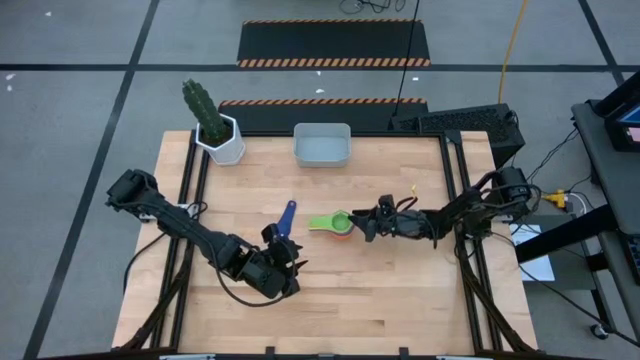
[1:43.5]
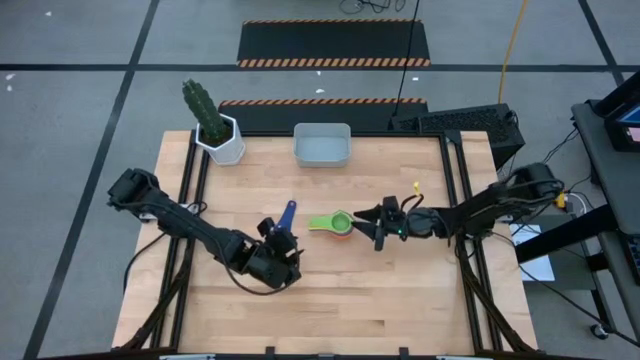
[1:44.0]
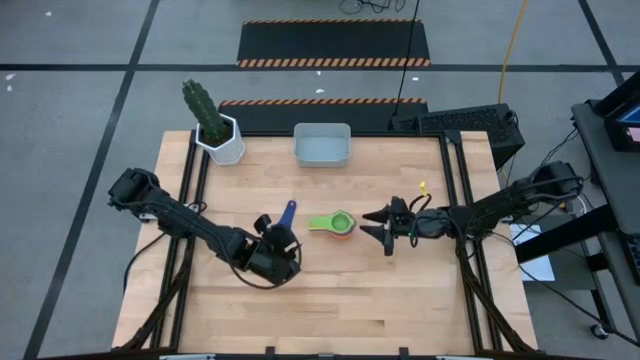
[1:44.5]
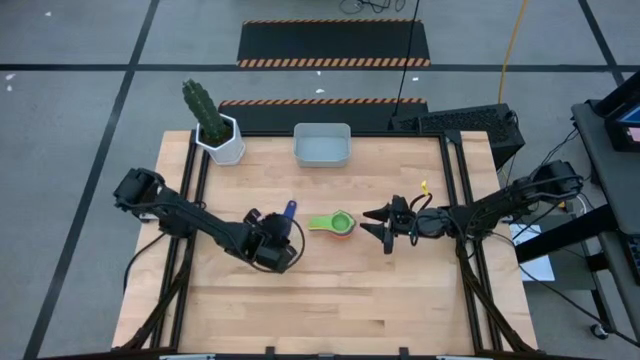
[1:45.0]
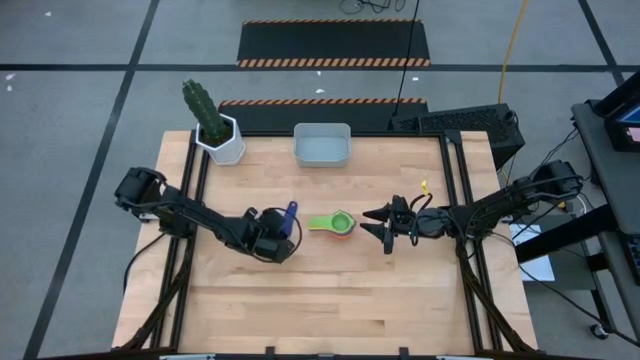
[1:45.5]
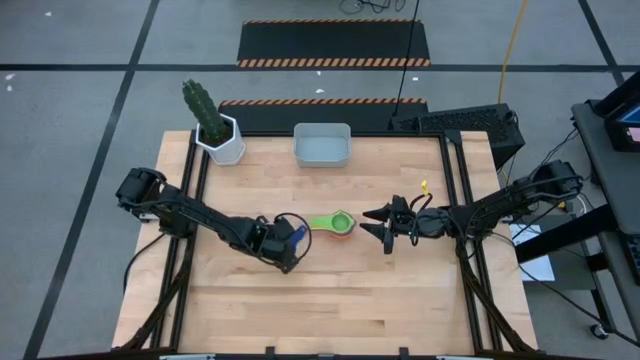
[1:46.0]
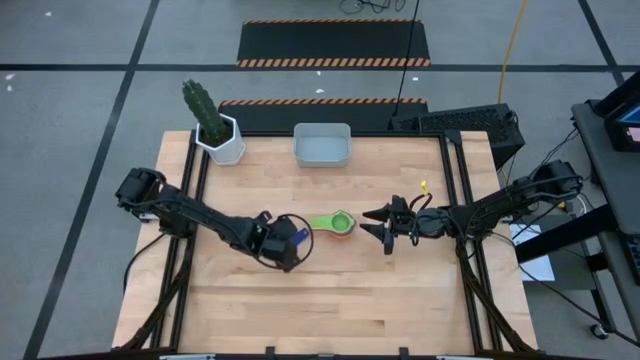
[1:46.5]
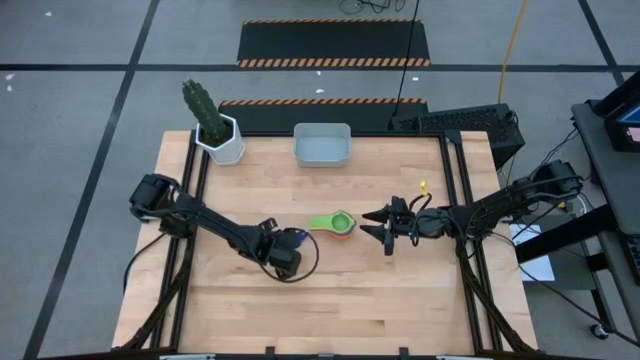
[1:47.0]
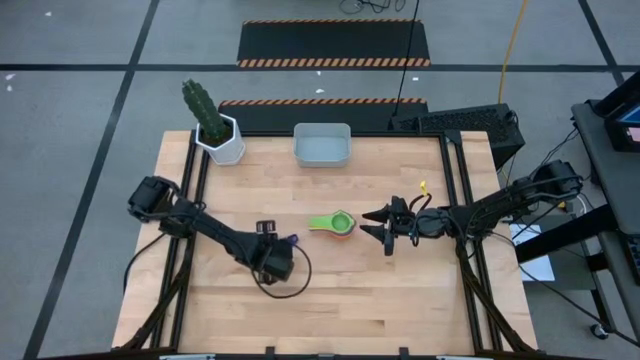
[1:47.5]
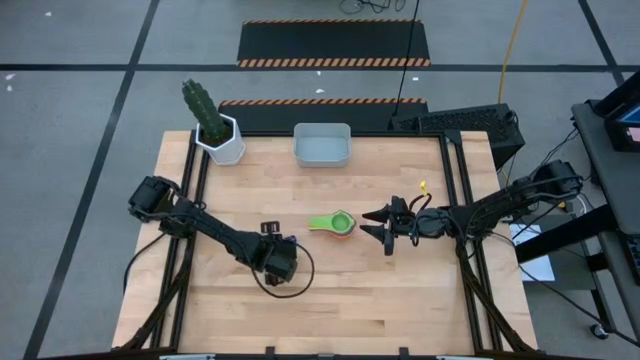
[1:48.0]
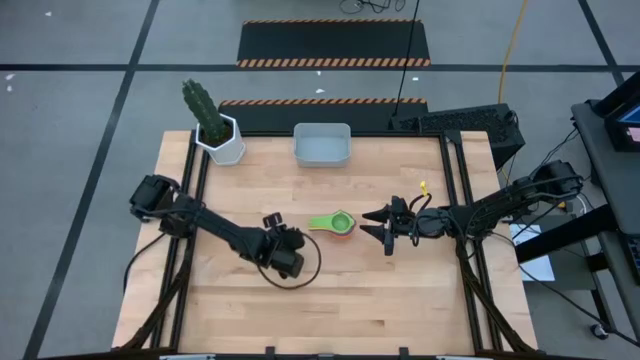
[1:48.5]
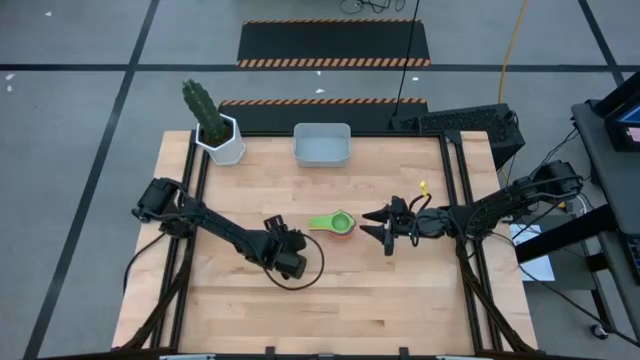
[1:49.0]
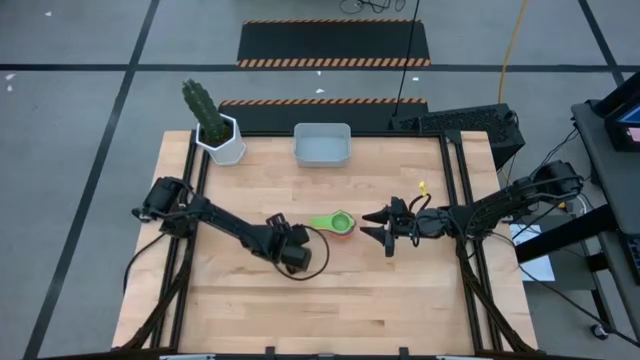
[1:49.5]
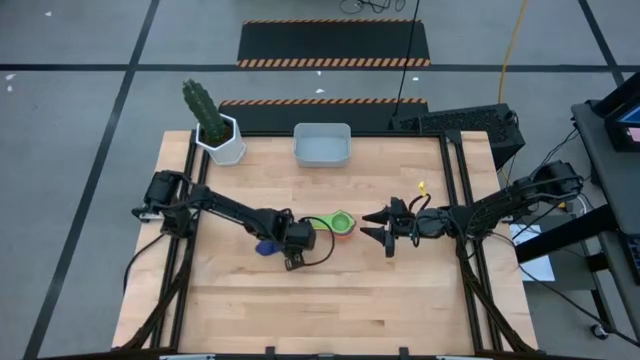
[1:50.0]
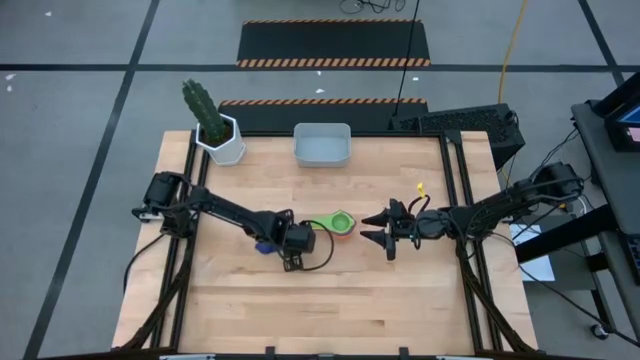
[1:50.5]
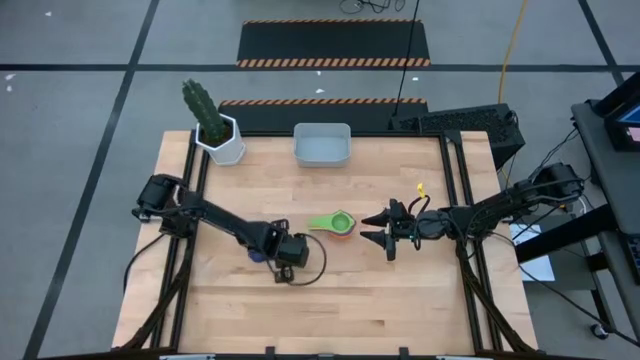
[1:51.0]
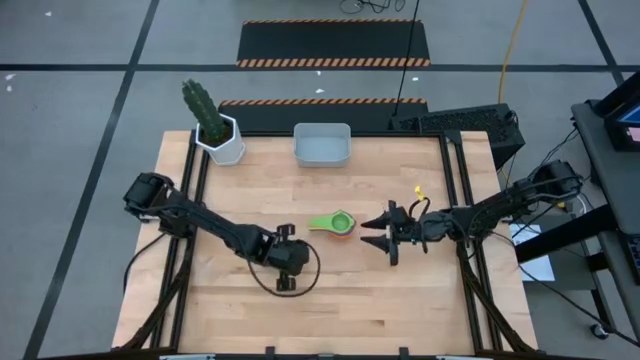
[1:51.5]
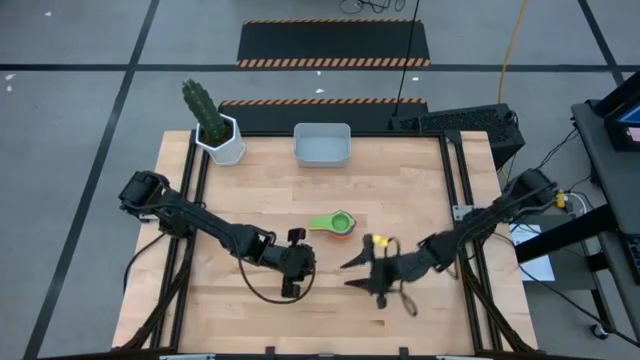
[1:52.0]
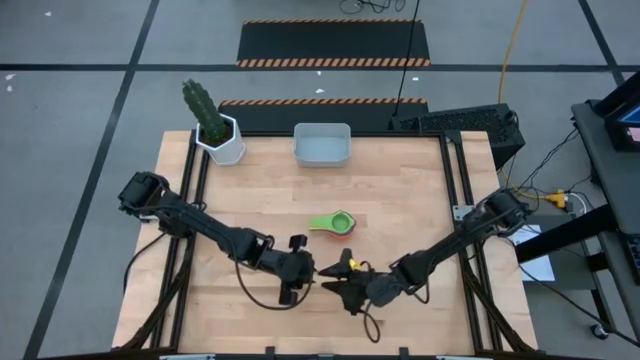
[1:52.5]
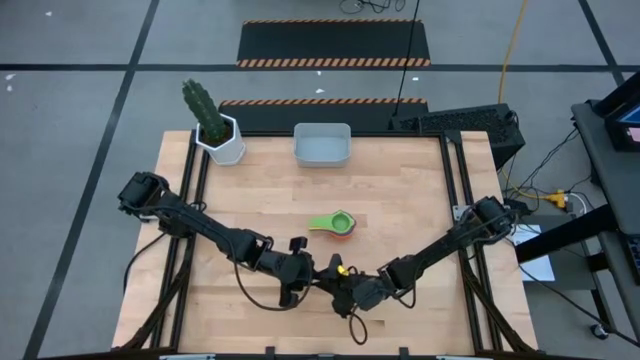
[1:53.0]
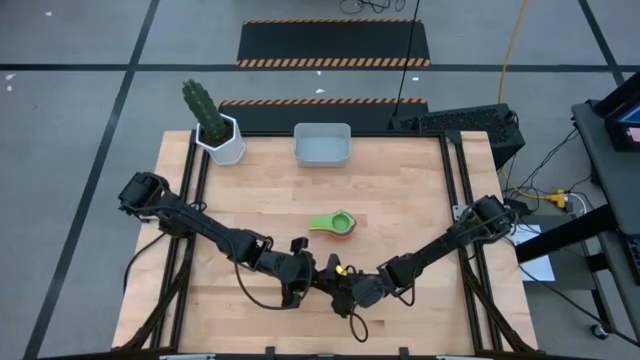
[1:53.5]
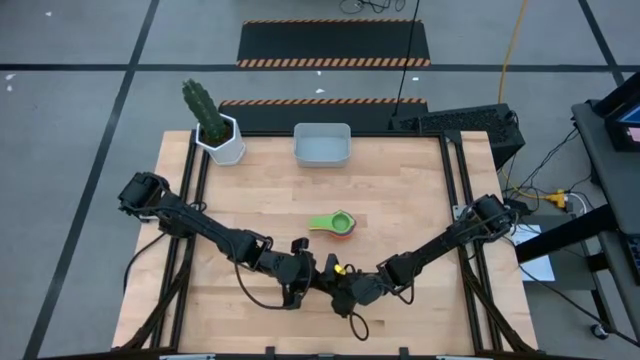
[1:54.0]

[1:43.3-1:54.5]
Task: Nest measuring cups in basket
Stack the violet measuring cup on top of the green measuring cup

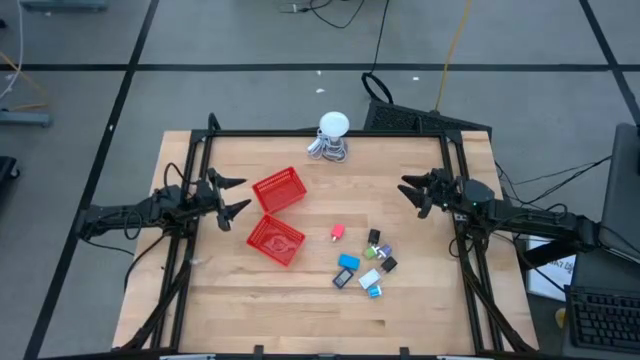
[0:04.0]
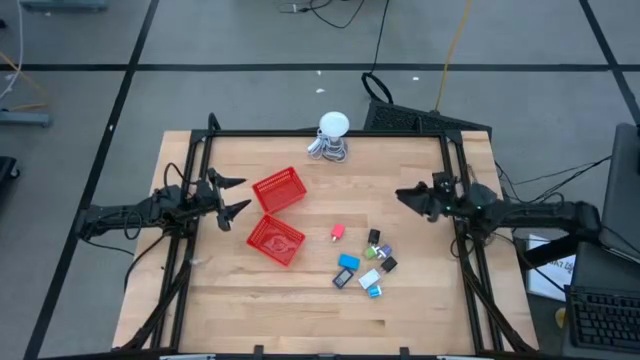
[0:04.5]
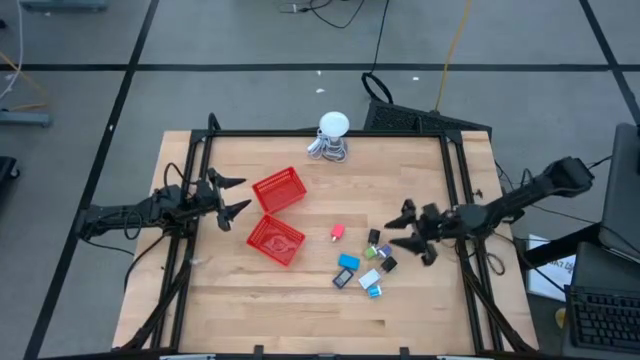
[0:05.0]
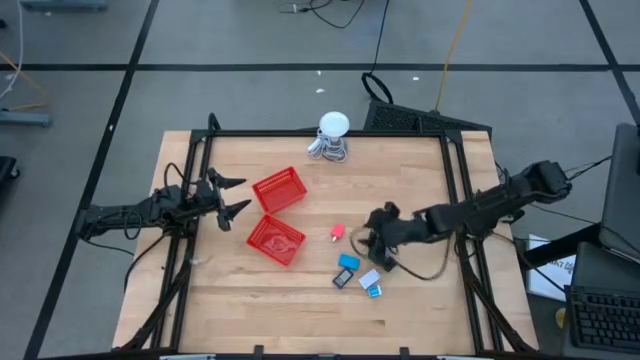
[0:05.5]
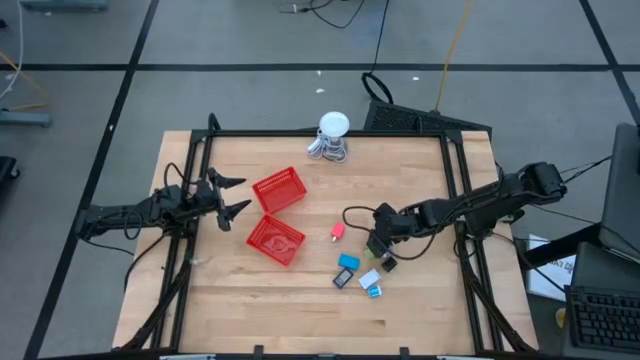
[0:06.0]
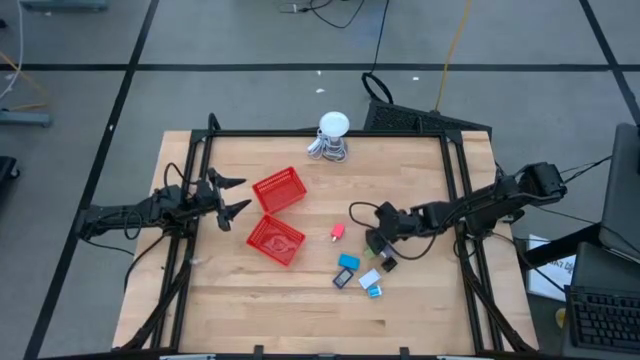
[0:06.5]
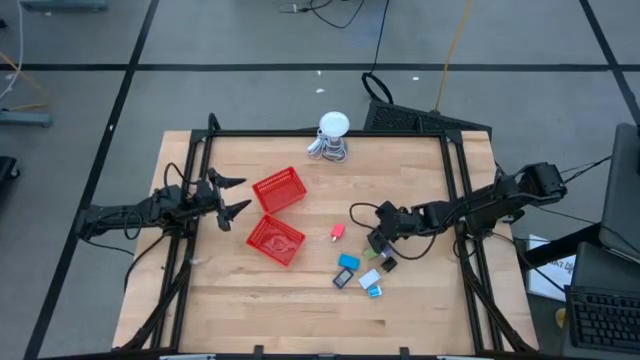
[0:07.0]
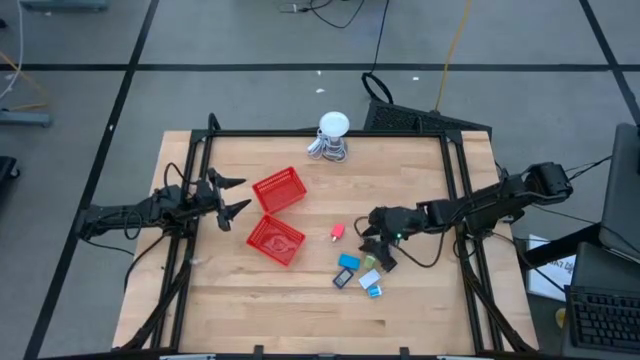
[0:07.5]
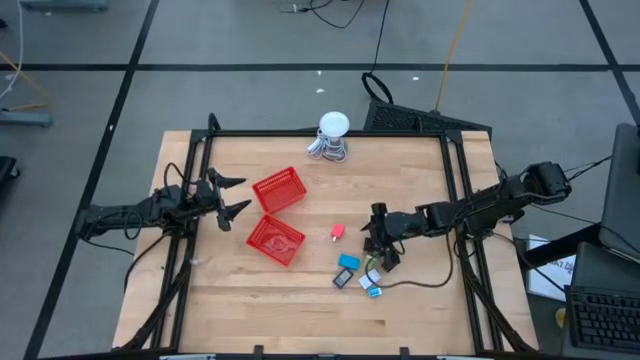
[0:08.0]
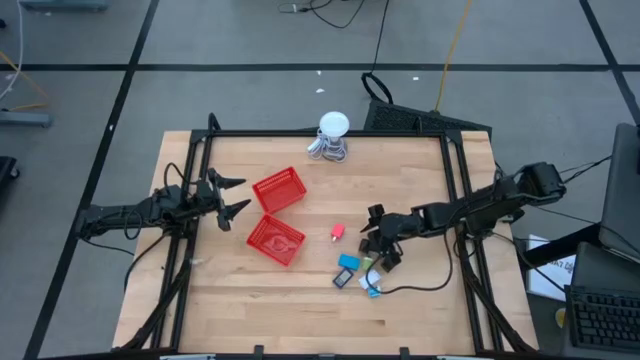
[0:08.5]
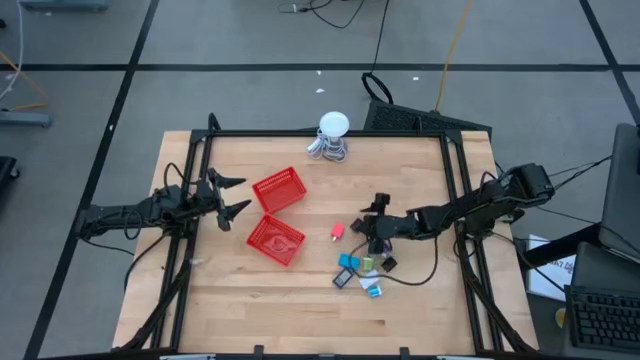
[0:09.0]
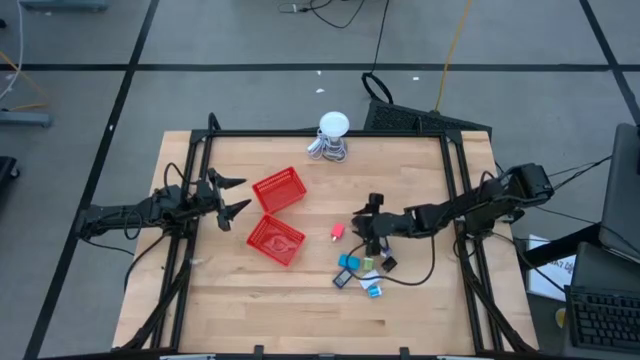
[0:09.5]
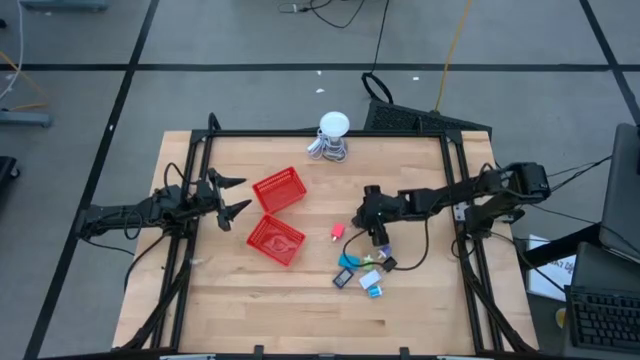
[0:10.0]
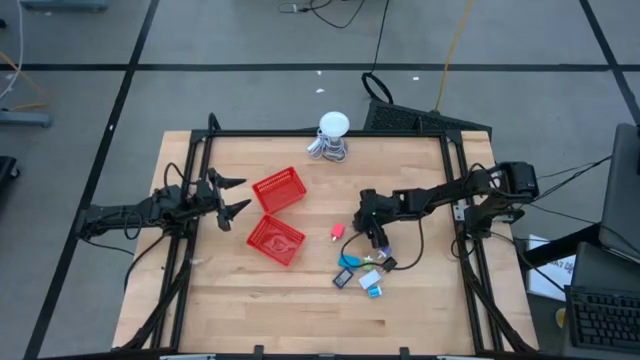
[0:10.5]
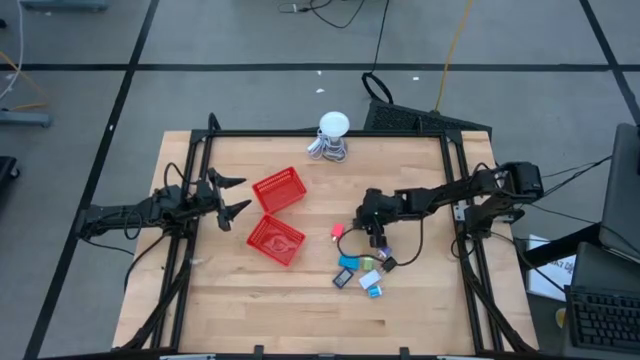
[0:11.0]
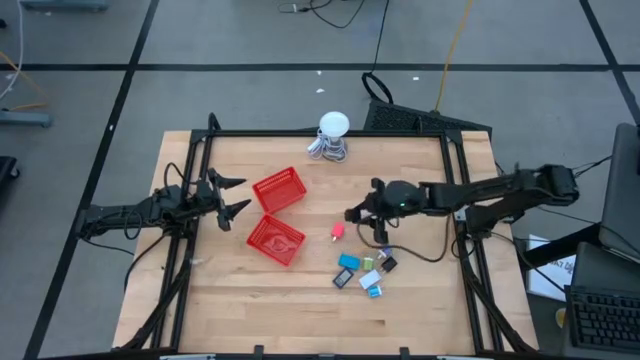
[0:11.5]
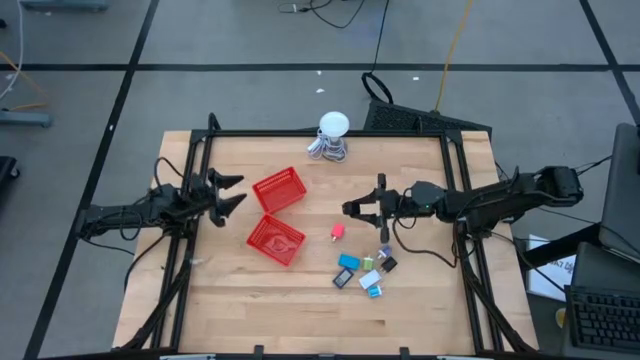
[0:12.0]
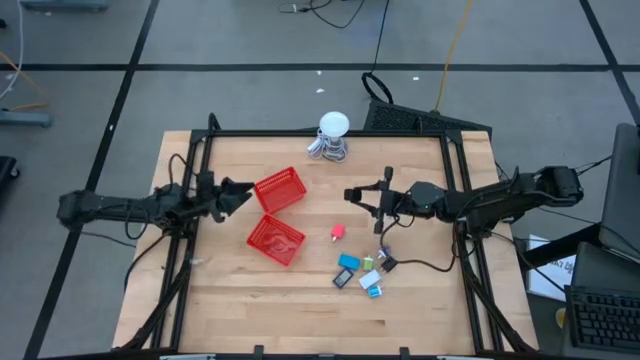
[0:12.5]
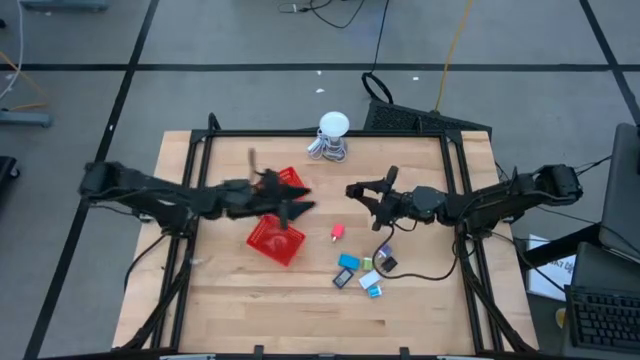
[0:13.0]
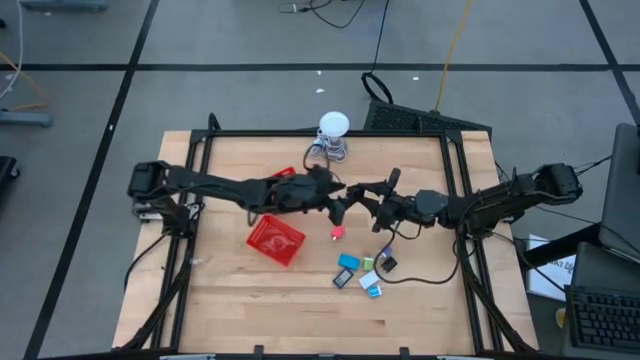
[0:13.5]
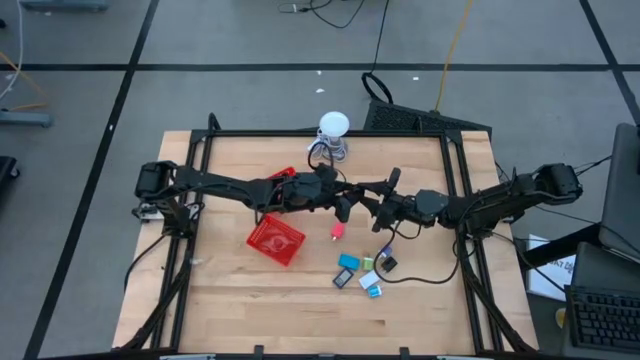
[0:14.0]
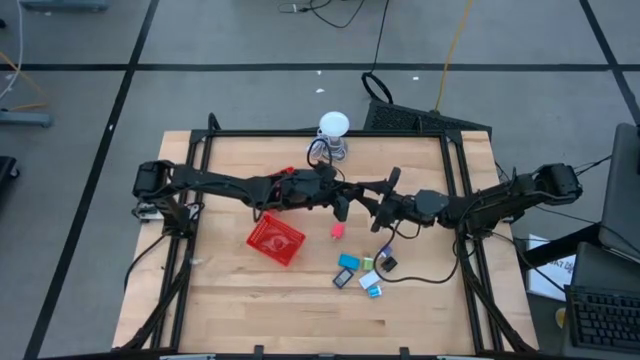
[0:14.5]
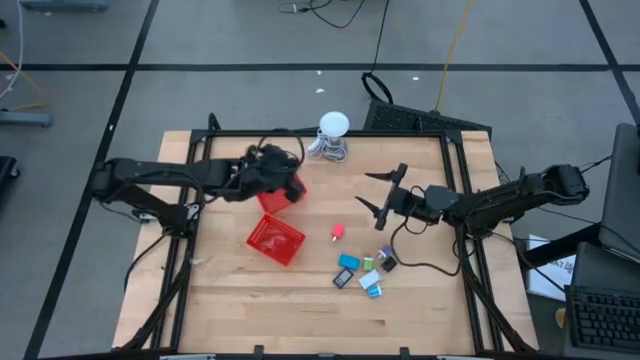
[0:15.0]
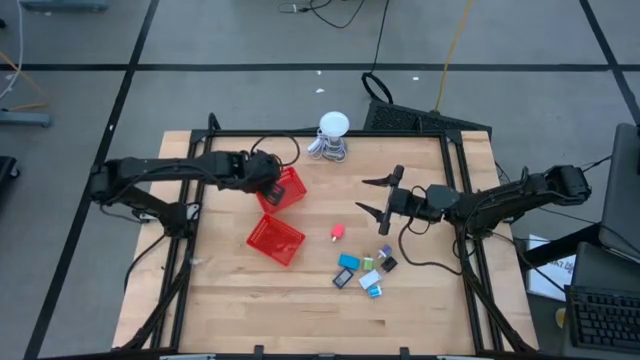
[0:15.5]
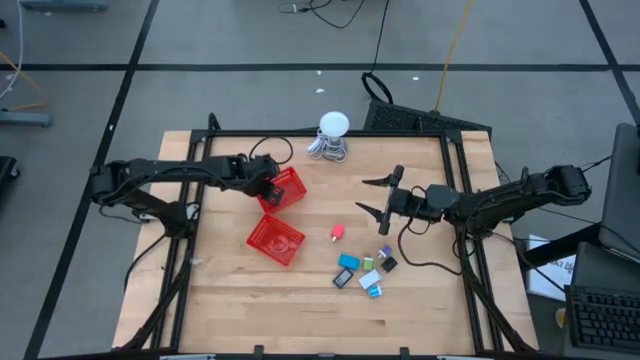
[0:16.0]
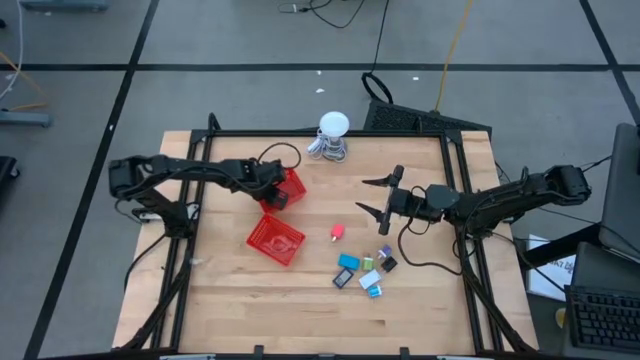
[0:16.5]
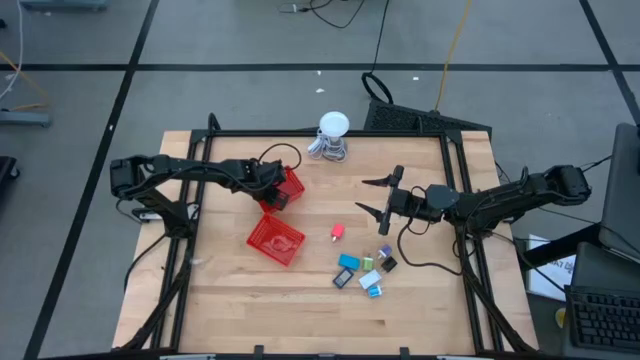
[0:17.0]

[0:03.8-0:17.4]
Task: Pick & Place Office items
Put the top black charger adapter into the top red basket
